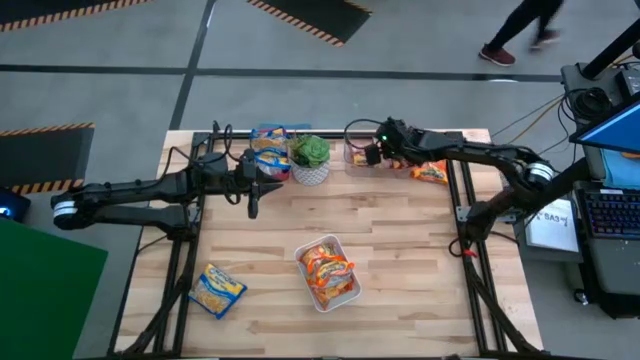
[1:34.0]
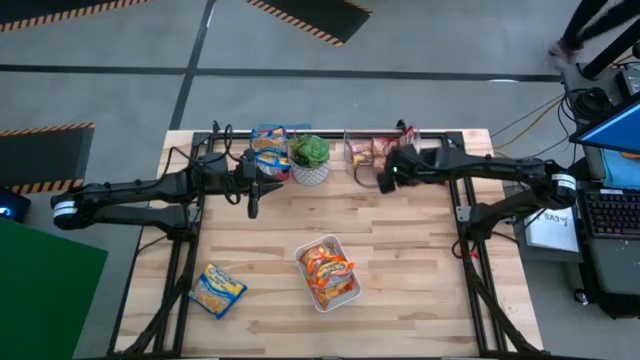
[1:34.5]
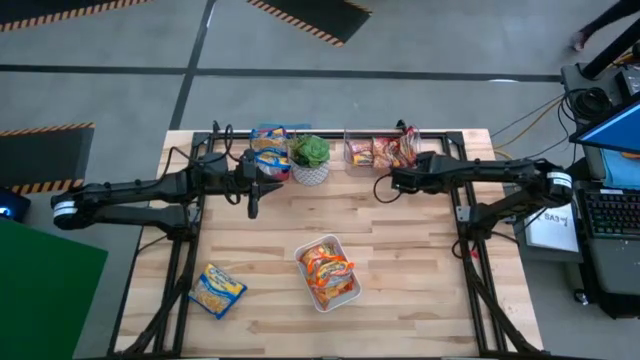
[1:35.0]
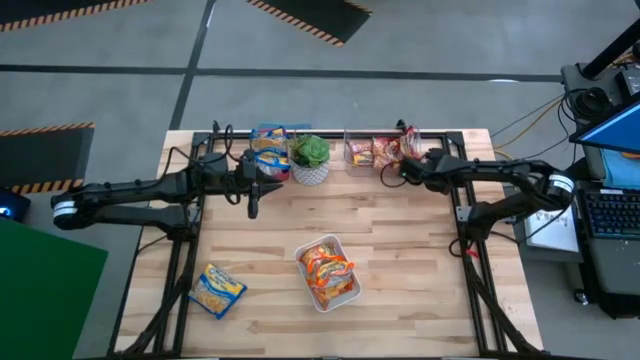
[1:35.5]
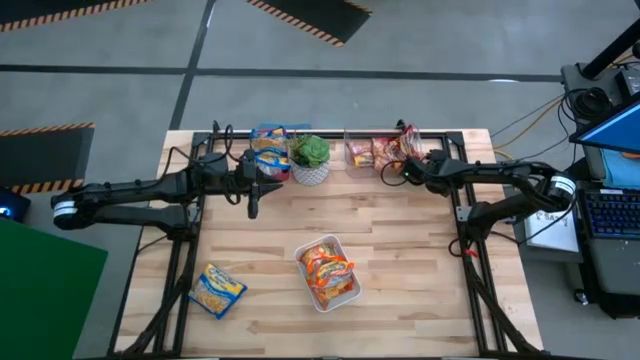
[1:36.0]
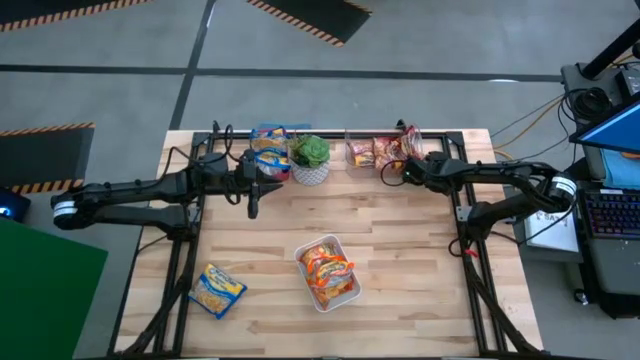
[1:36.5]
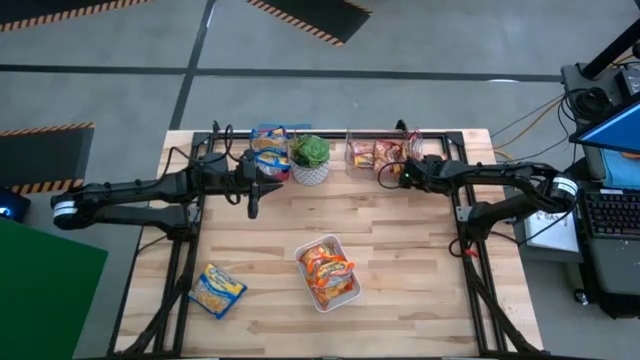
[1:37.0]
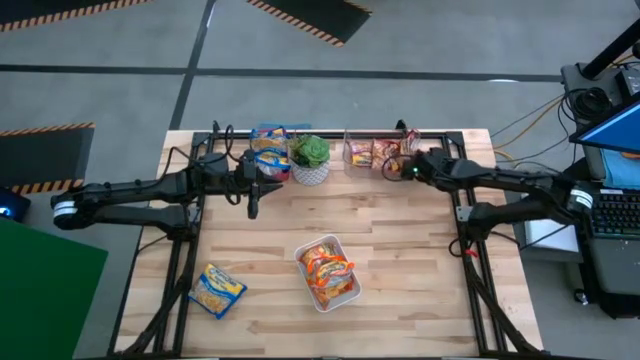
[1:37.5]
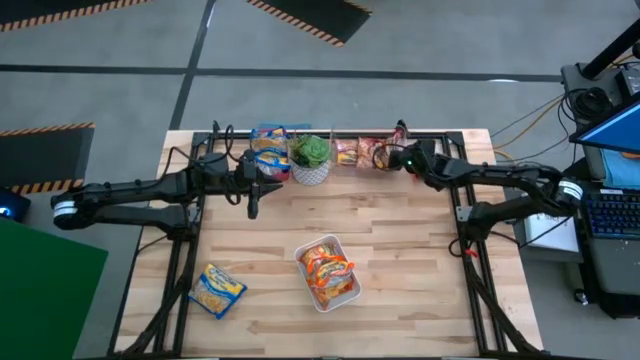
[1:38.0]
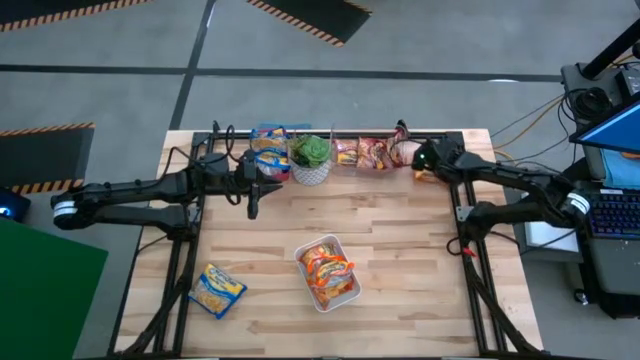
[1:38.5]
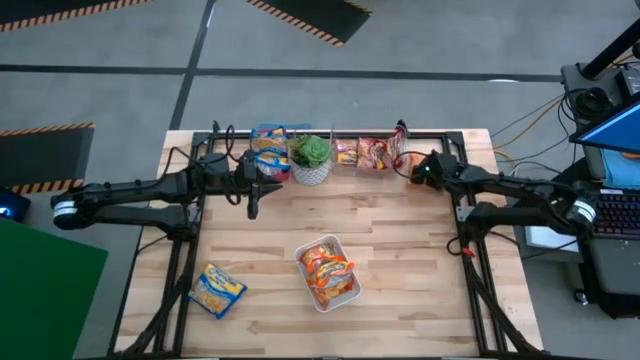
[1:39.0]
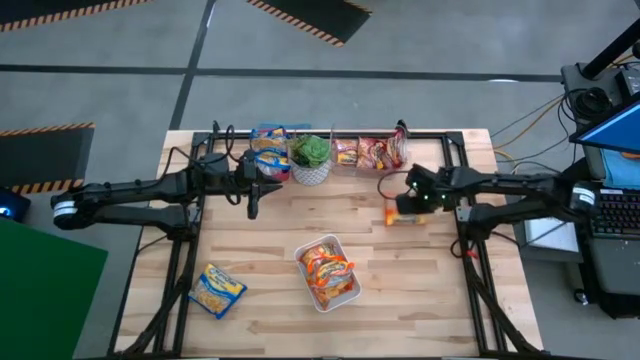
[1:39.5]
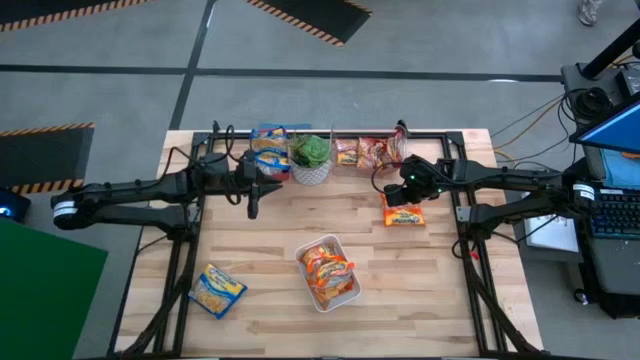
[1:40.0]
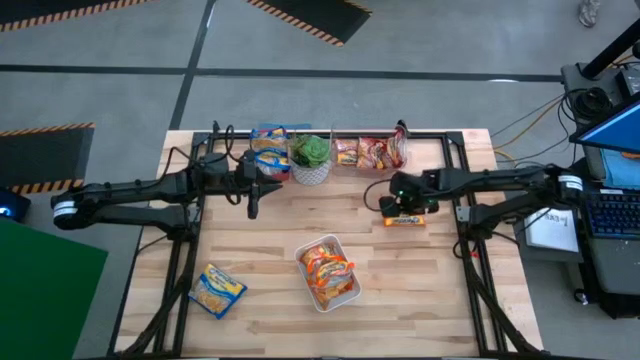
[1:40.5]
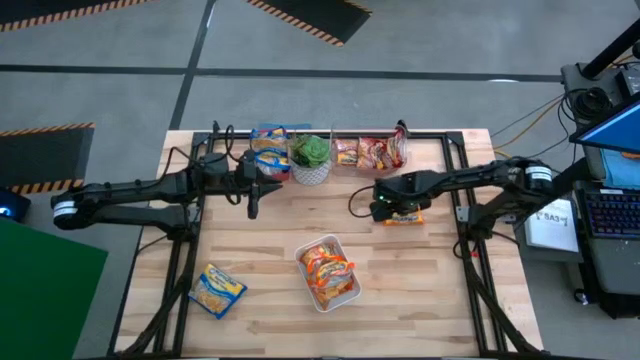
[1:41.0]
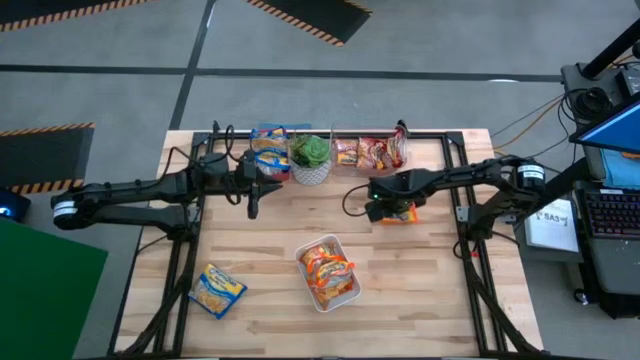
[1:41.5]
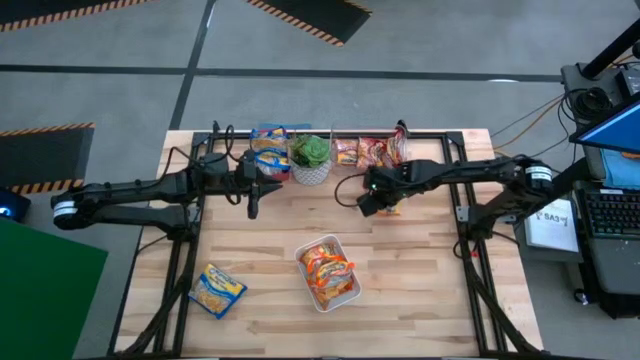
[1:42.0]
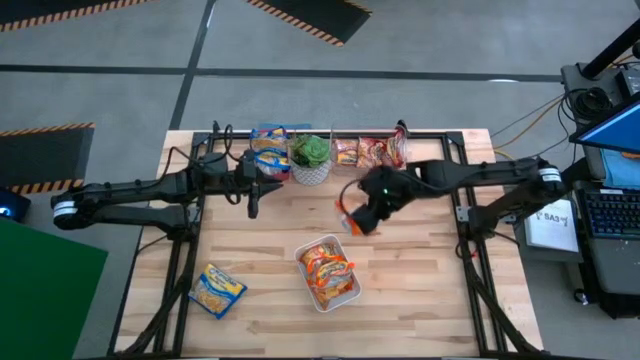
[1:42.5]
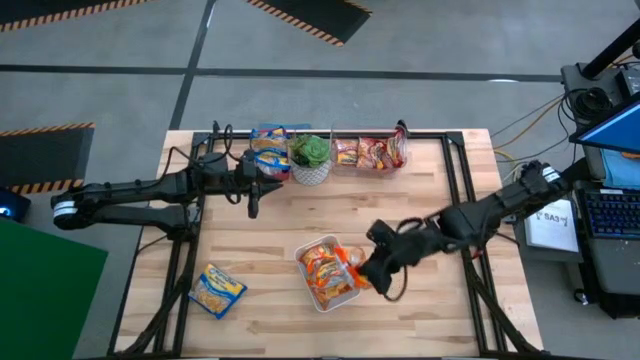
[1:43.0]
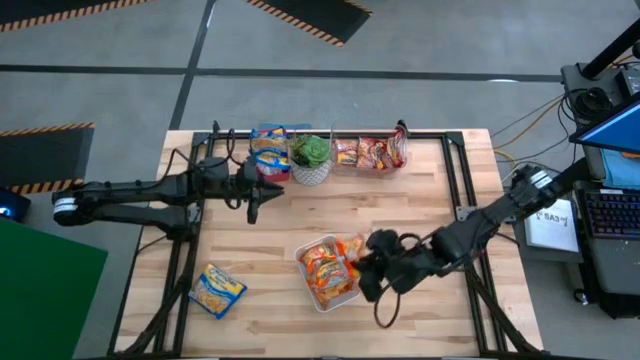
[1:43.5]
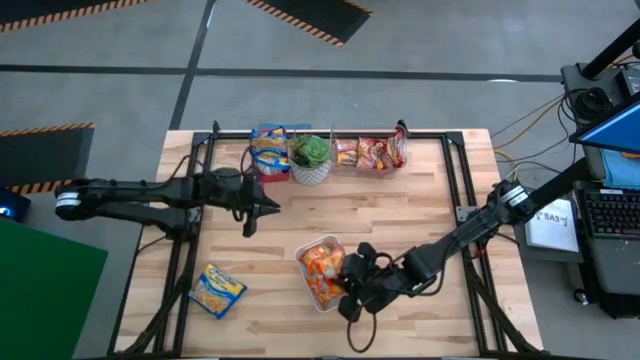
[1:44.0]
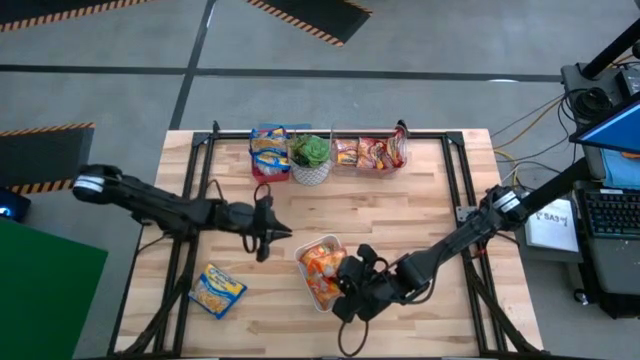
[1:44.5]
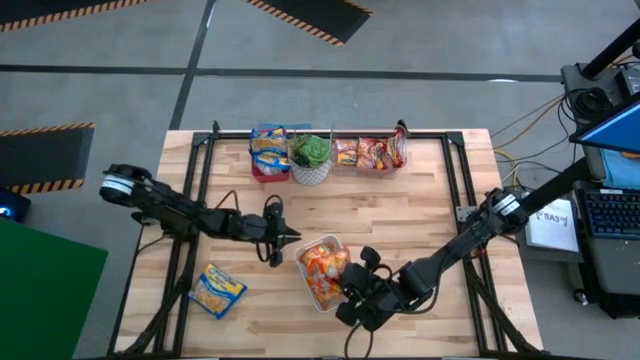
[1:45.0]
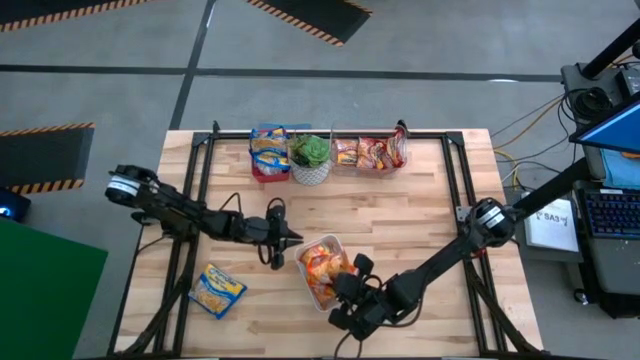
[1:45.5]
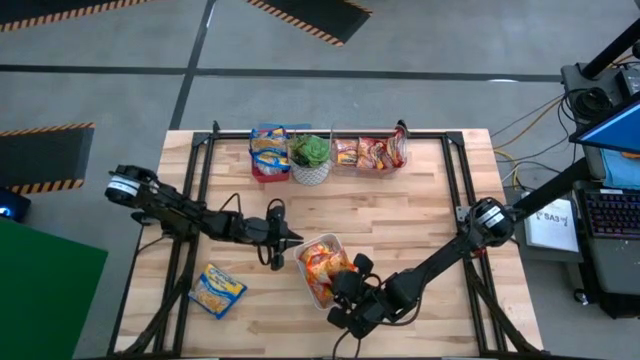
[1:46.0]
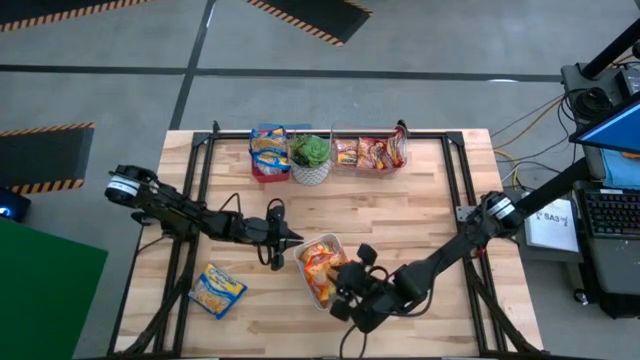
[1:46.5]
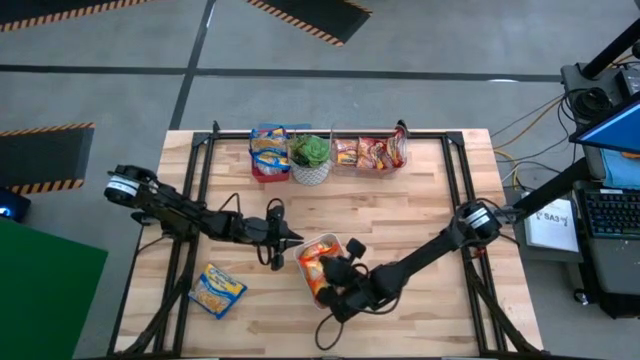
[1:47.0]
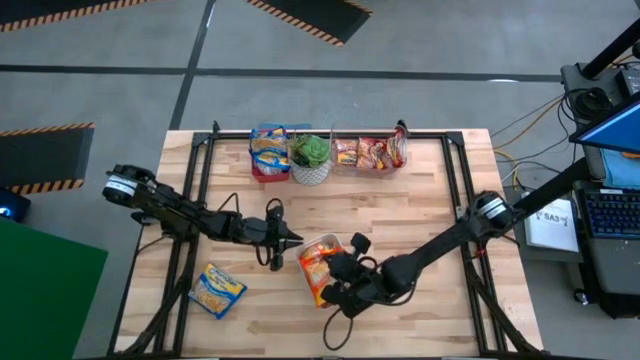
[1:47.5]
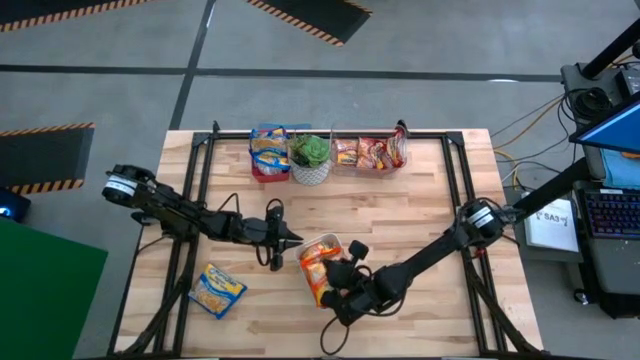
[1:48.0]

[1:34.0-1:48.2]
Task: Sort Maruchan noodles
Put the orange noodle pack into the white bin

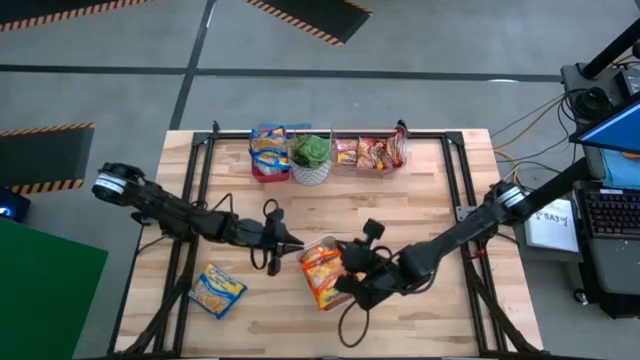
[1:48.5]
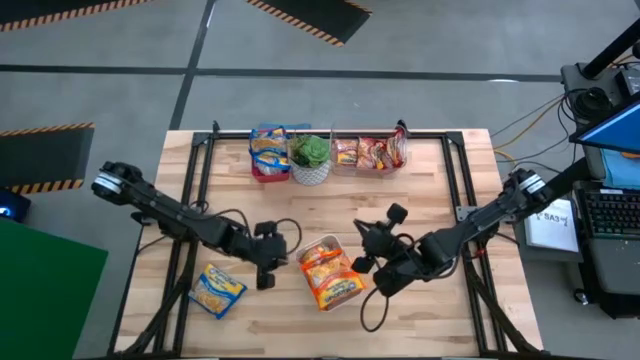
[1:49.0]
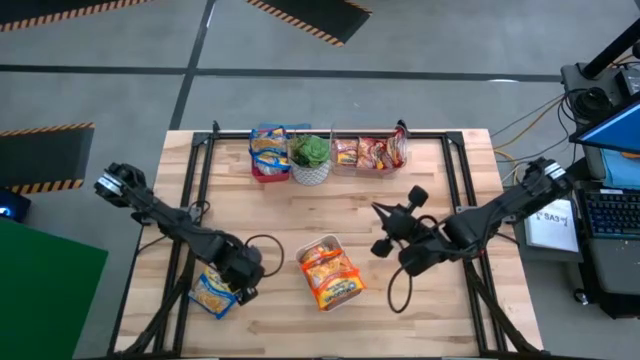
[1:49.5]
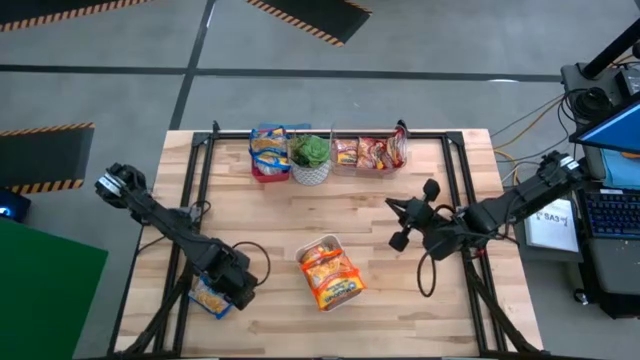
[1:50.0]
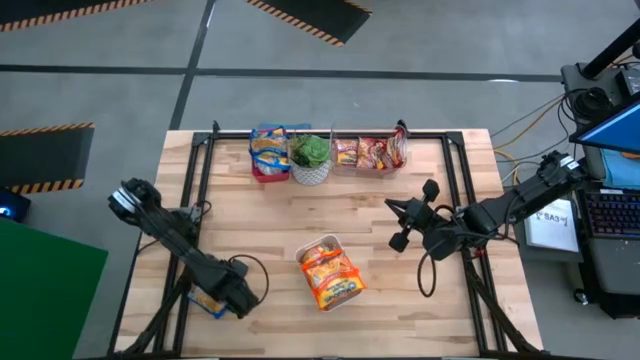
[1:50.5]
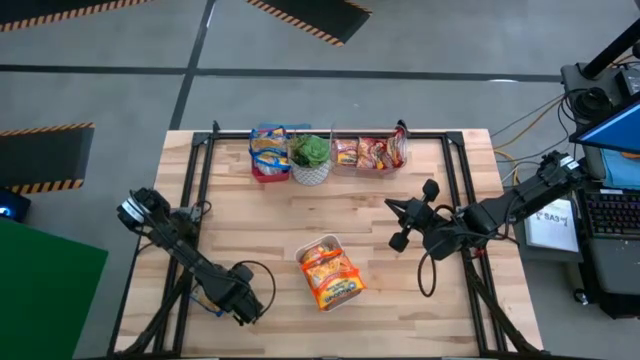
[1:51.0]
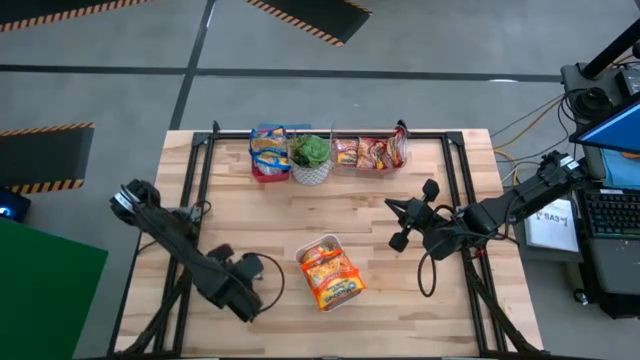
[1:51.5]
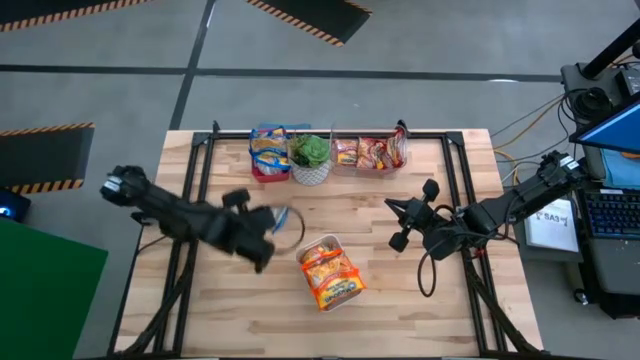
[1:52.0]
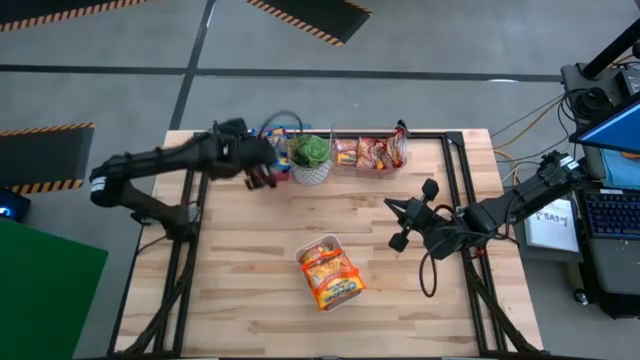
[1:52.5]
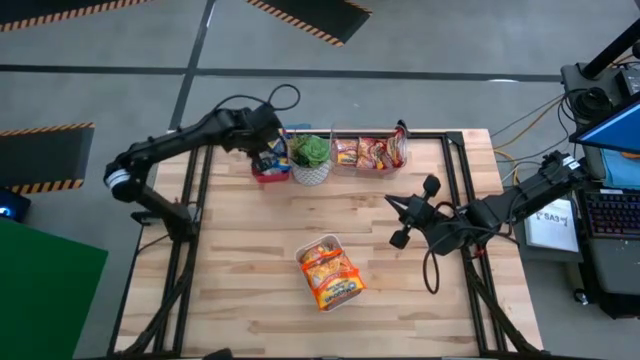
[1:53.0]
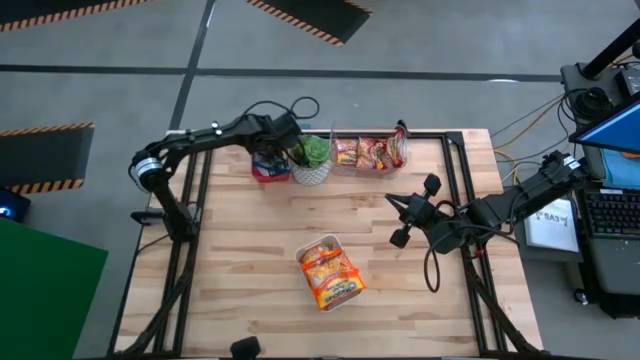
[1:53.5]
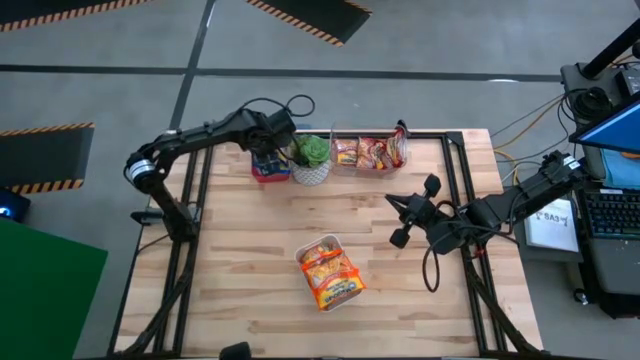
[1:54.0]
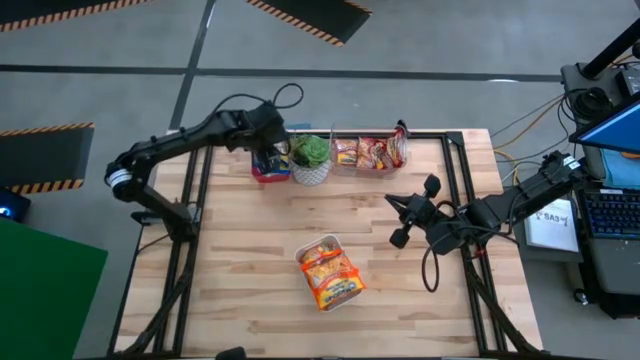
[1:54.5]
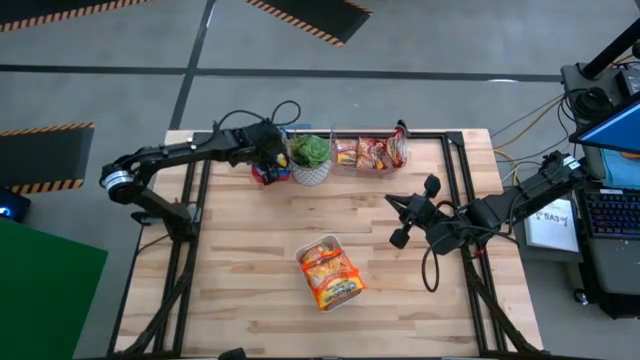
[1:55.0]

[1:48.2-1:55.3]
Put the blue noodle pack into the red bin

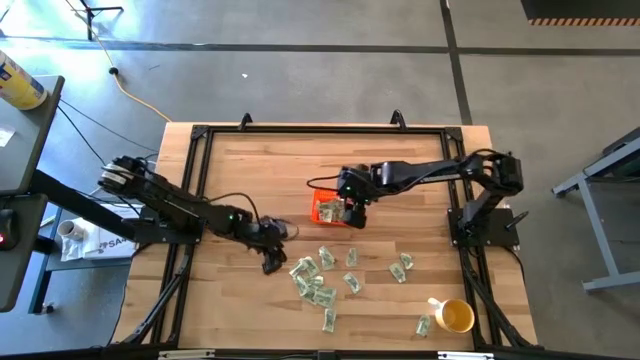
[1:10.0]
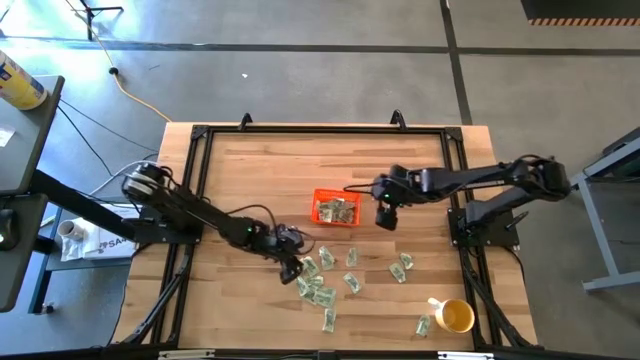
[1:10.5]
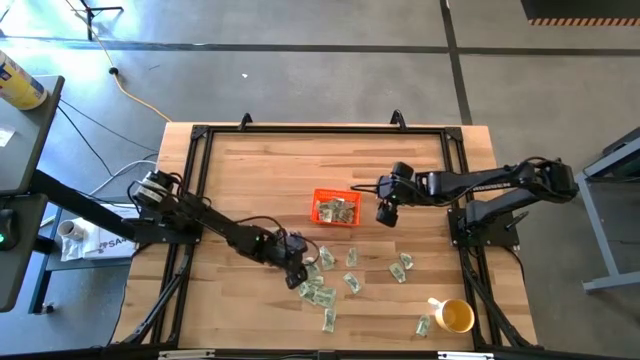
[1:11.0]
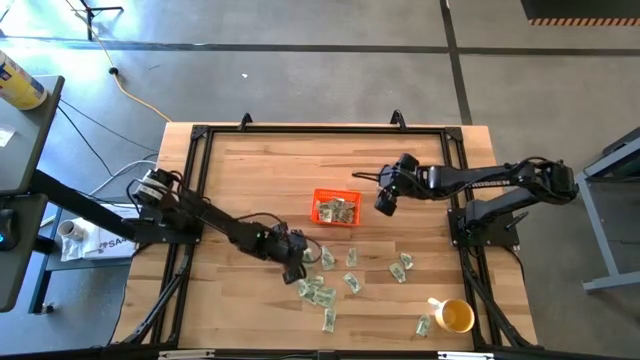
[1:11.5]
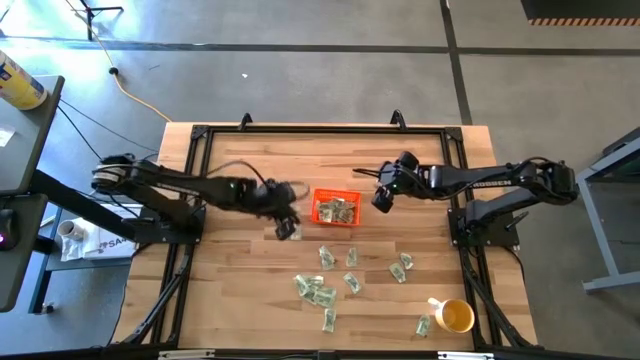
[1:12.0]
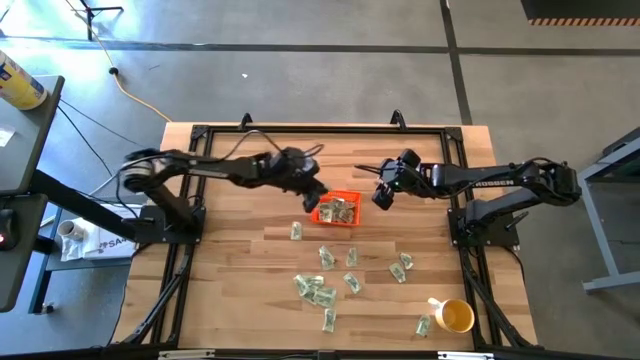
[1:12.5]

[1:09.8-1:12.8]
Task: Pick and place Stevia / Truvia into bins
Put the stevia packet into the orange bin
